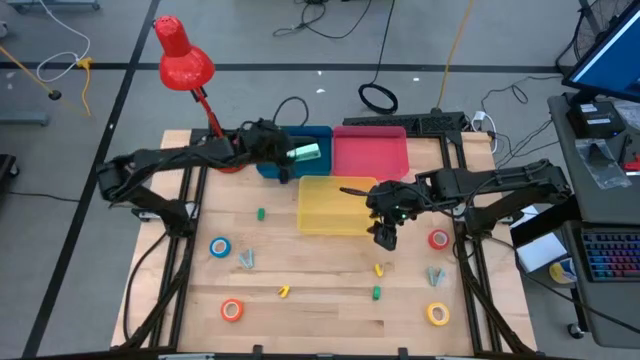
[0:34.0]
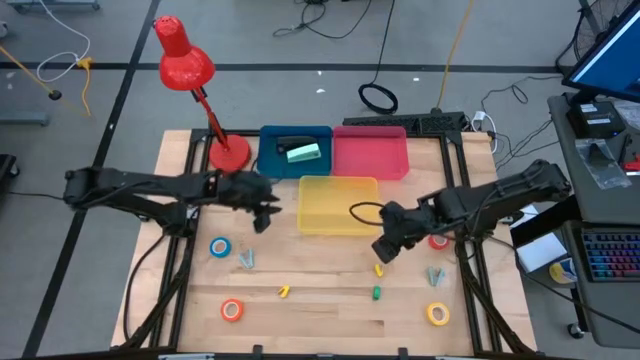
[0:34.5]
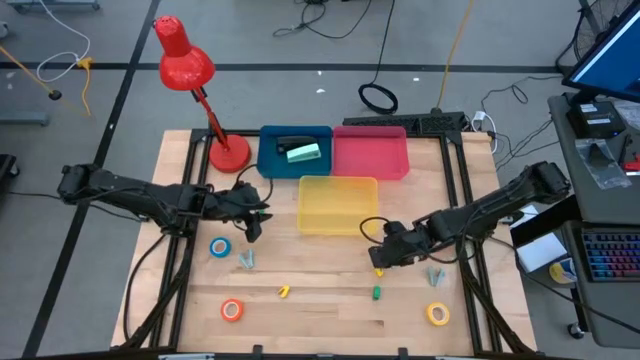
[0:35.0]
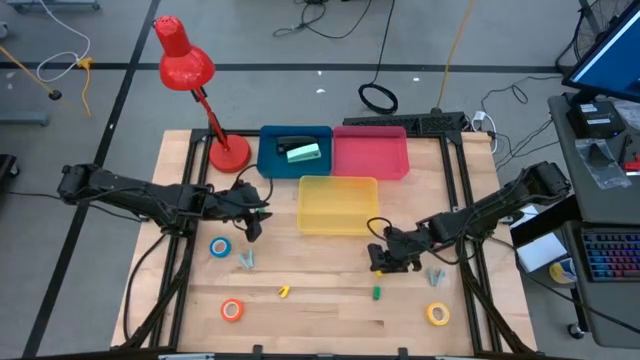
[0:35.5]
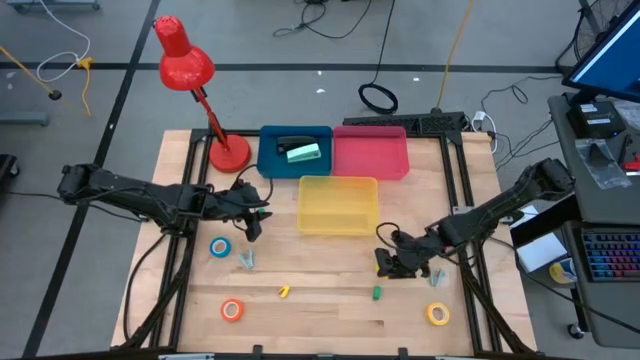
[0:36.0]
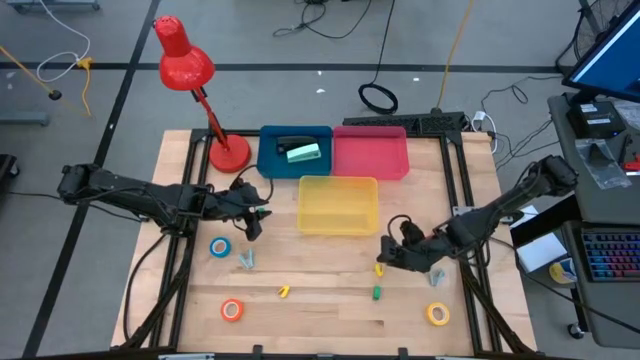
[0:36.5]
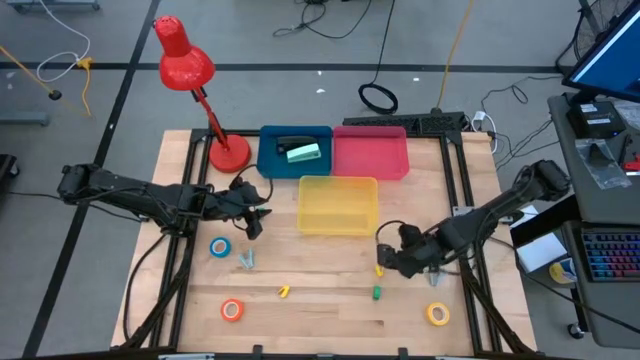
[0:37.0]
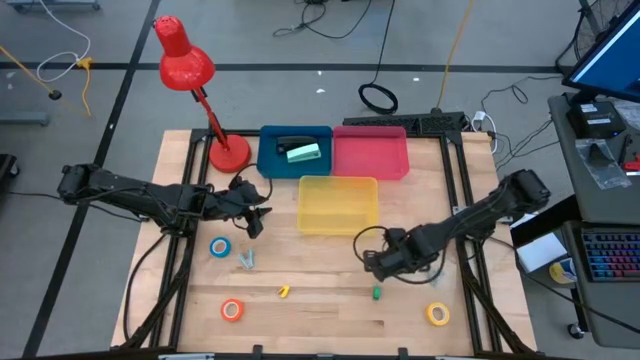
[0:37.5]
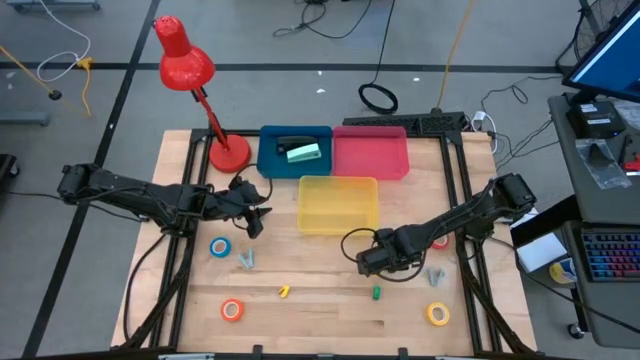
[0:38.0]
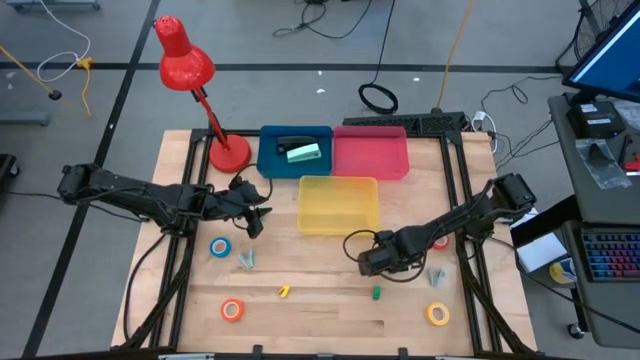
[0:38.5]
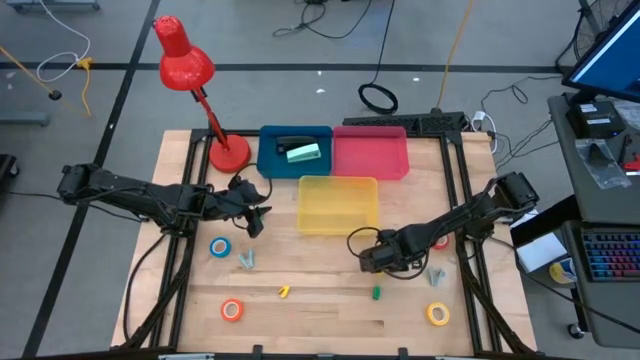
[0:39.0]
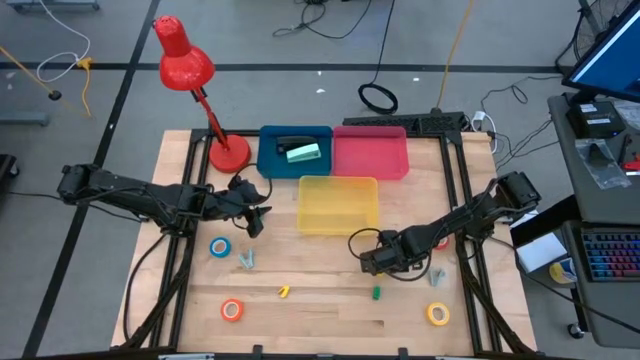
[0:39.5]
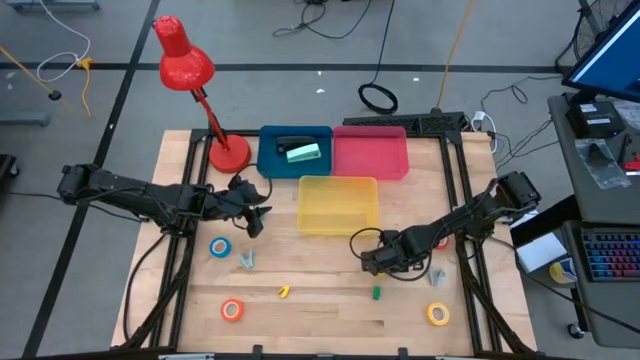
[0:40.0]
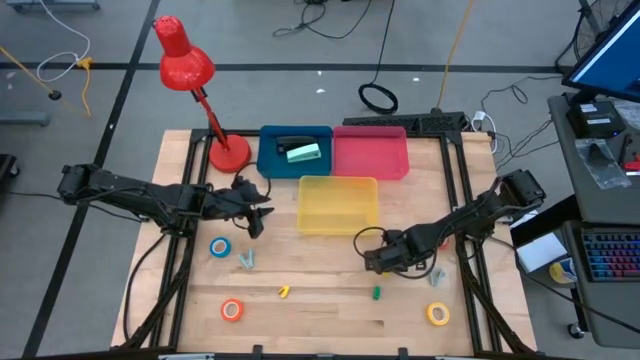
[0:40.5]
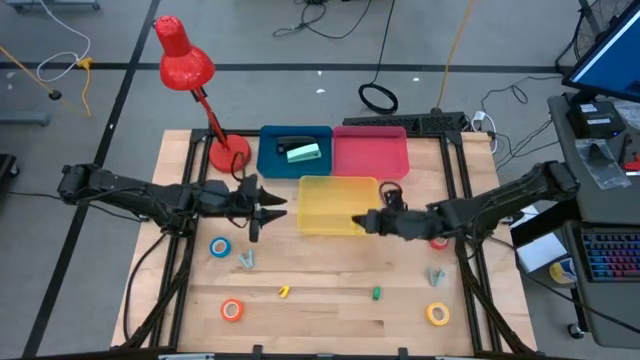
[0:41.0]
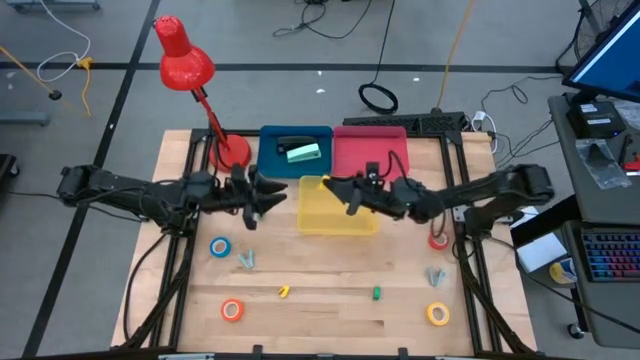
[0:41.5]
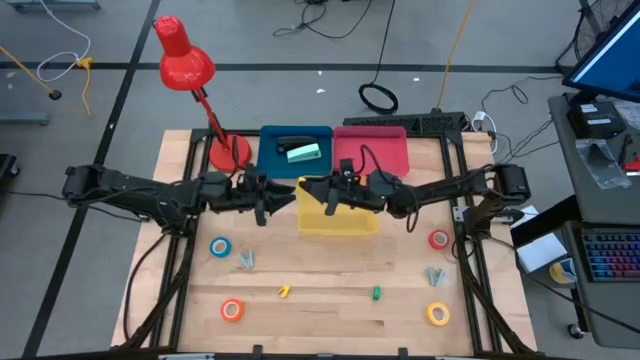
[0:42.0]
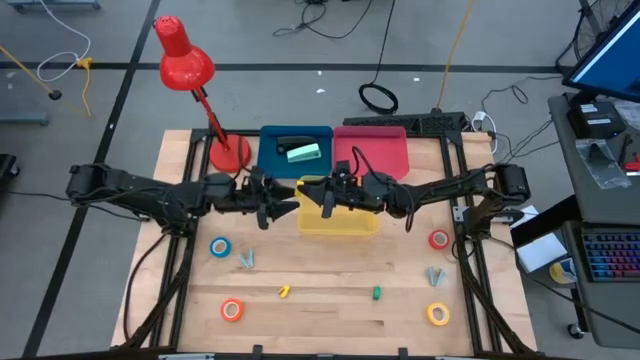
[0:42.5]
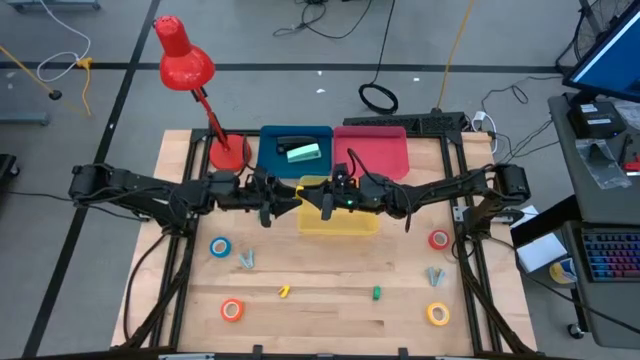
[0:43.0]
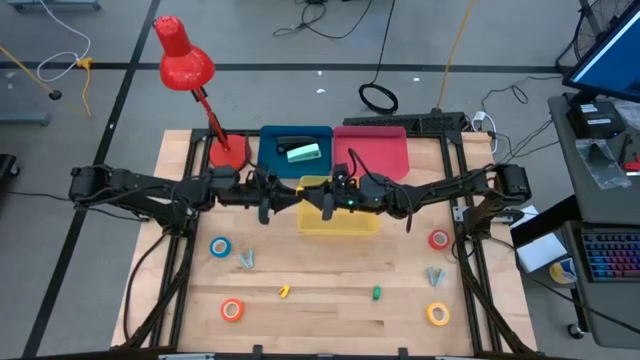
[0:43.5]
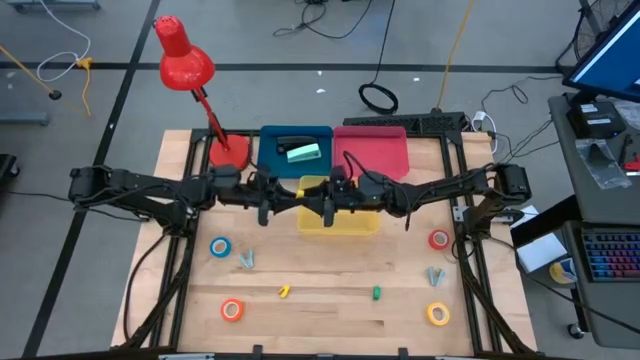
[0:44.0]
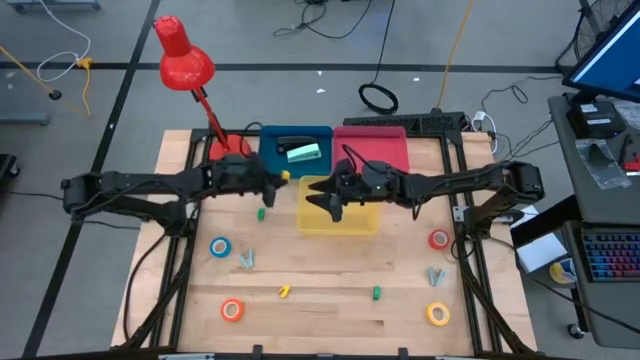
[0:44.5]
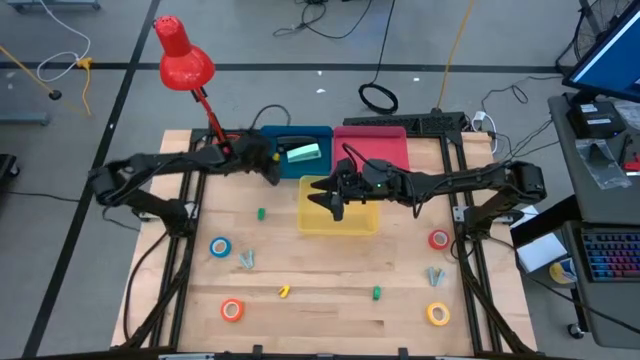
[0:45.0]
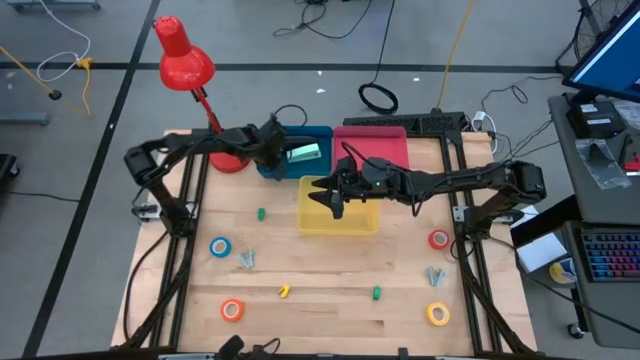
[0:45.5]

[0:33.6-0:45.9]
Task: Pick and place Stapler, Stapler remover, tape
Put the right yellow small stapler into the blue bin

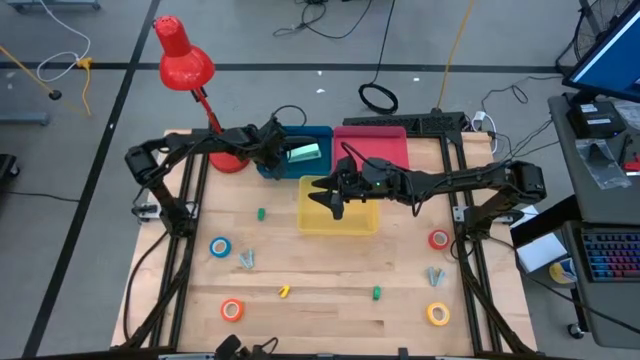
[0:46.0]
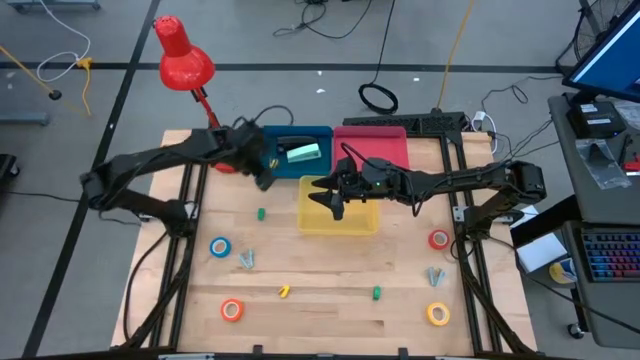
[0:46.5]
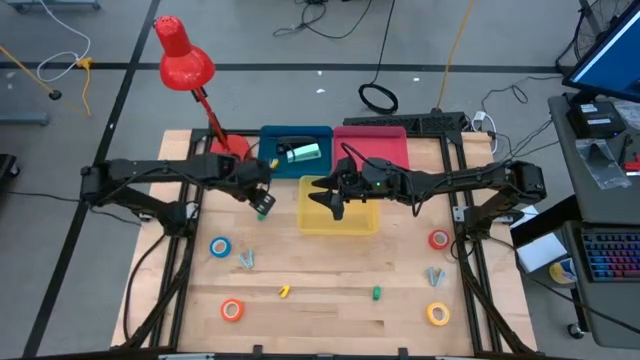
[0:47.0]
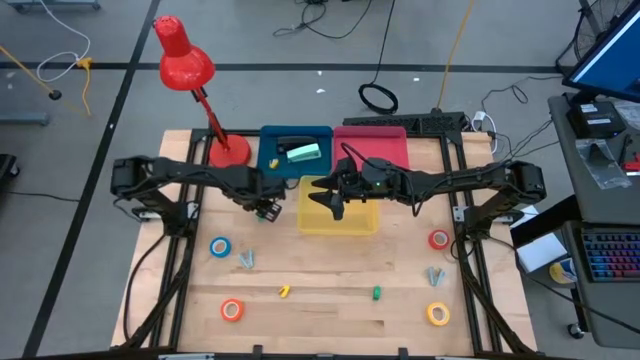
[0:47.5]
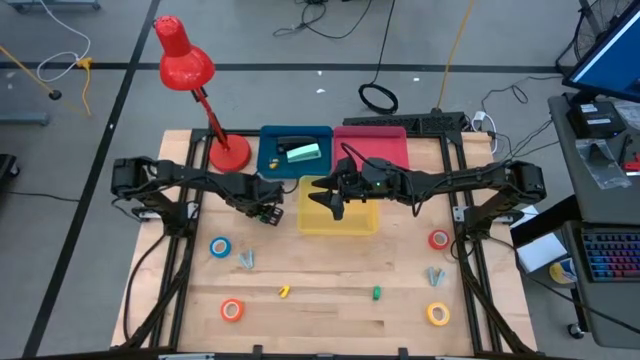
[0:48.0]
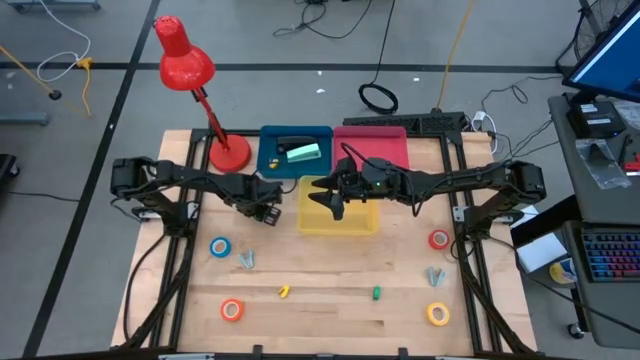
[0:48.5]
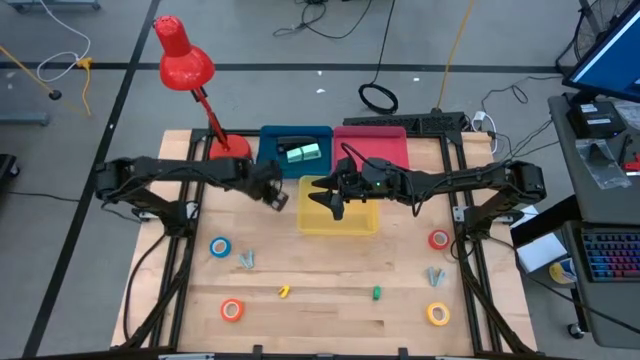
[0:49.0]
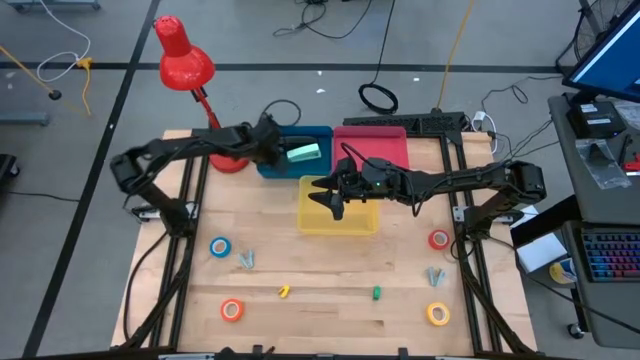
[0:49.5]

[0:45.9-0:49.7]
Put the left green small stapler into the blue bin

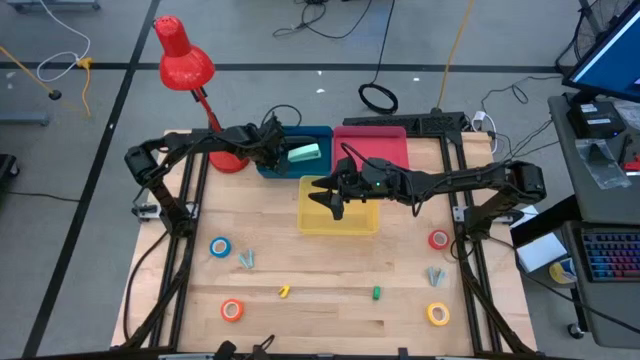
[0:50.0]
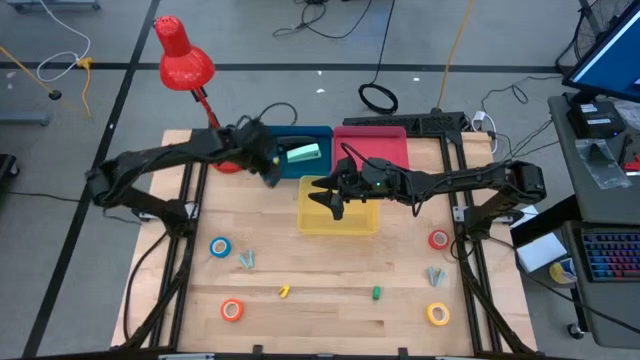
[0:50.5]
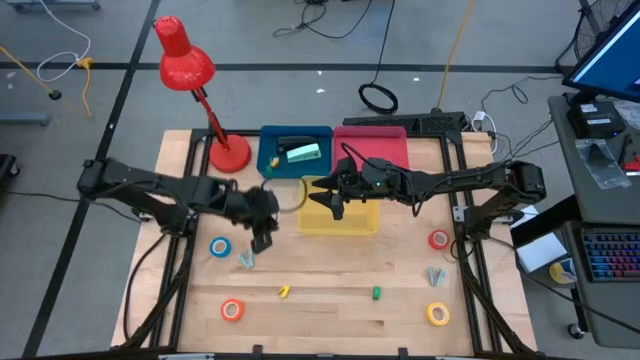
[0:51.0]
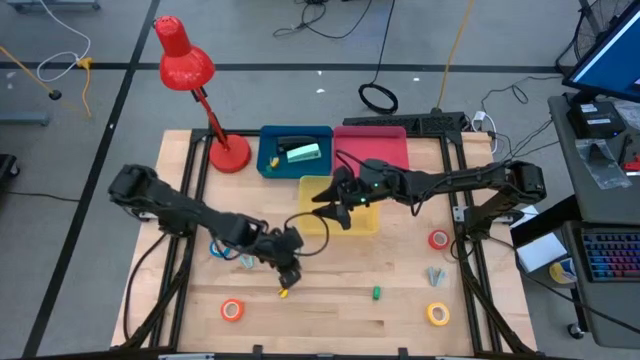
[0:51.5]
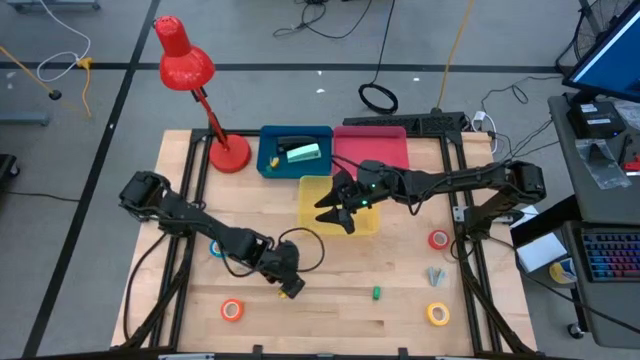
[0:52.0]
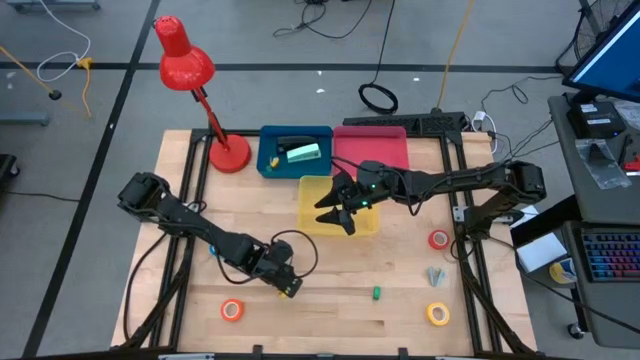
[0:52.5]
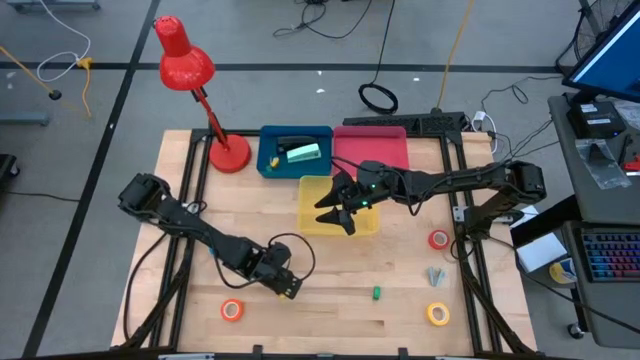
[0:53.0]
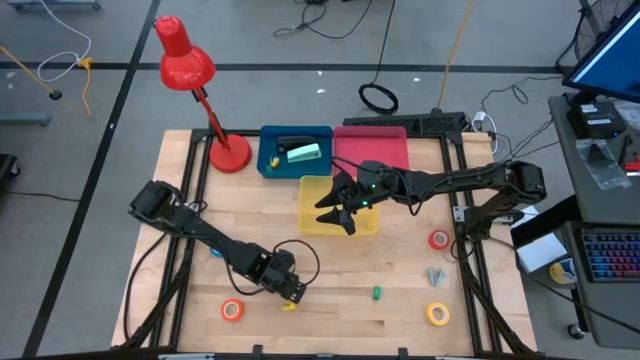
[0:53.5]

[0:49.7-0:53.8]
Put the yellow small stapler into the blue bin

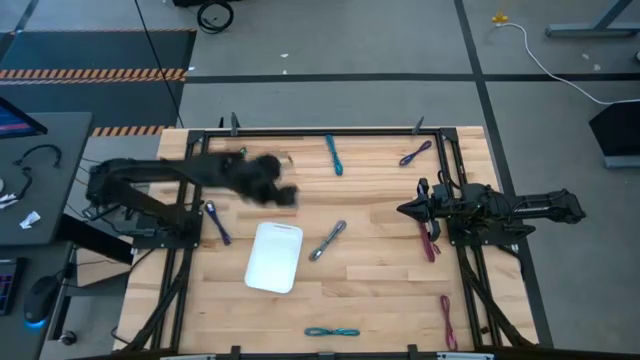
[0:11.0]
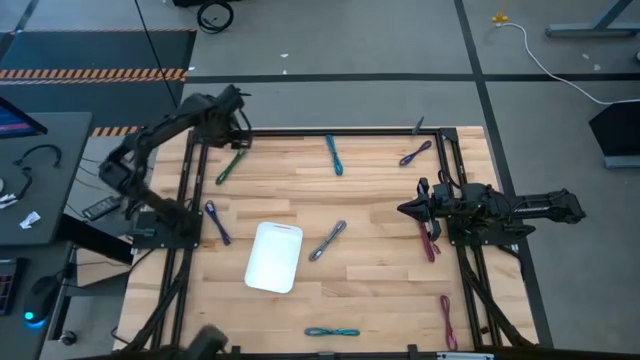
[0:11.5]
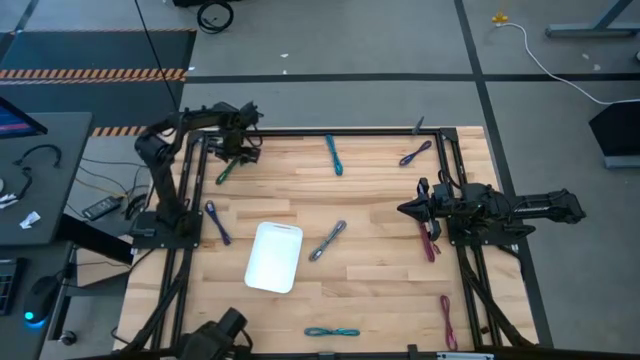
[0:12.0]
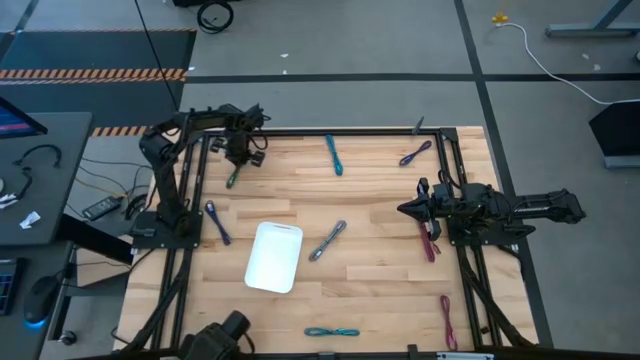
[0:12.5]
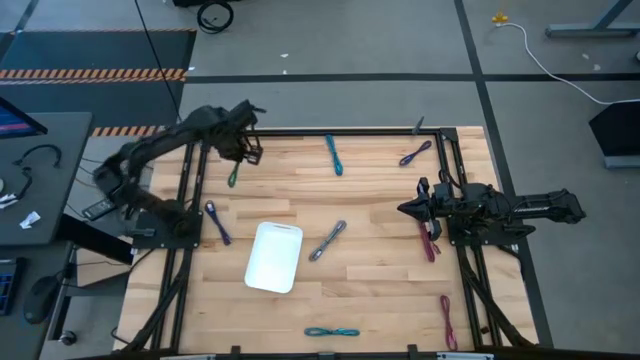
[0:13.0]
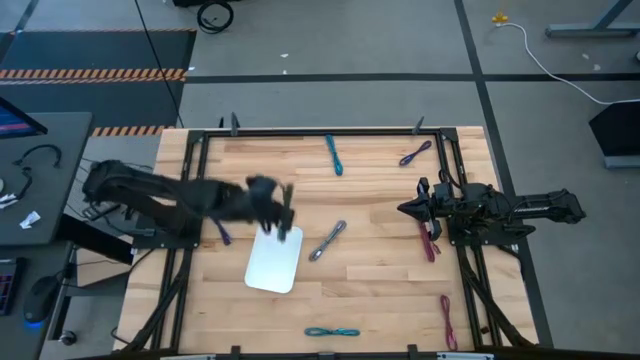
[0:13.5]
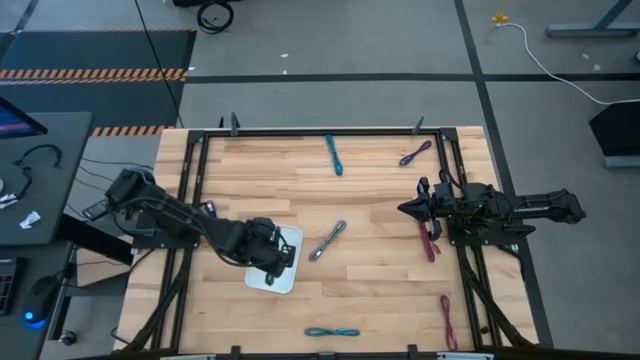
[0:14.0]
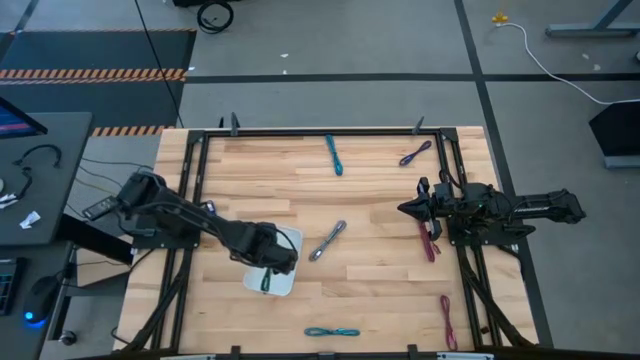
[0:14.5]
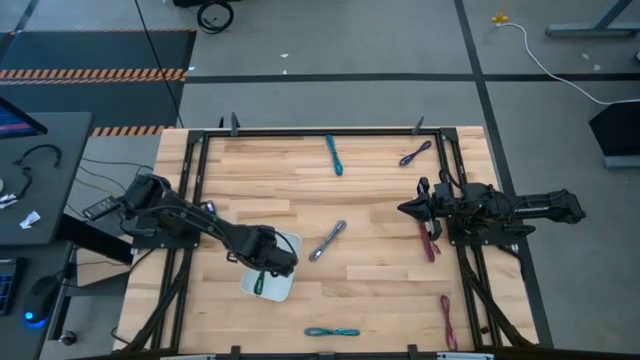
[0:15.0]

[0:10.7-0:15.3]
Task: Pick and place USB-C Cables
Put the green charger cable into the white bin
